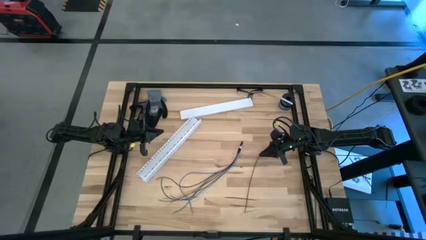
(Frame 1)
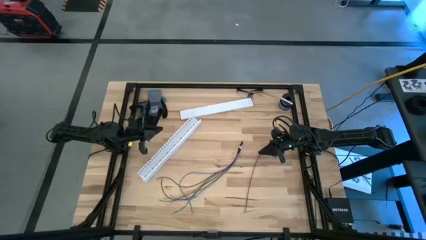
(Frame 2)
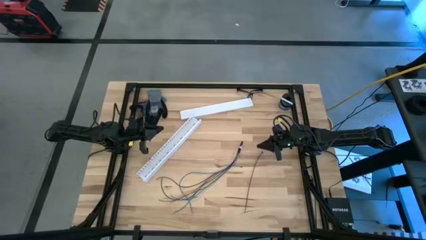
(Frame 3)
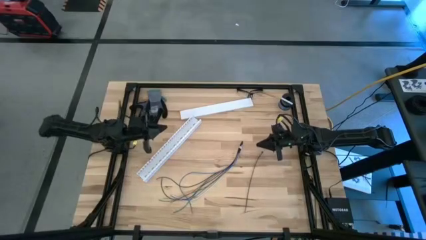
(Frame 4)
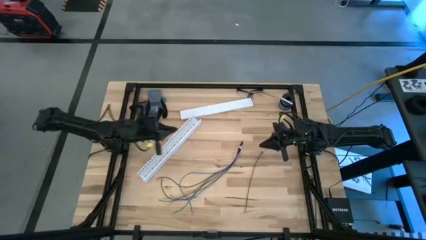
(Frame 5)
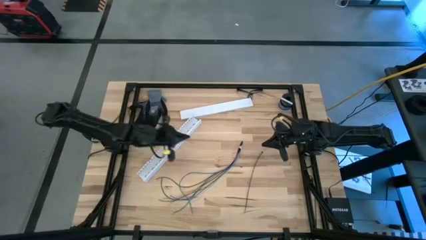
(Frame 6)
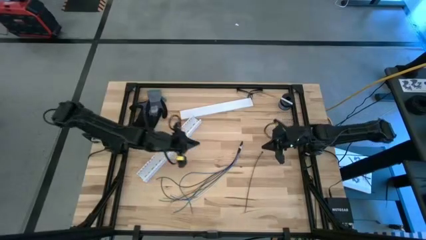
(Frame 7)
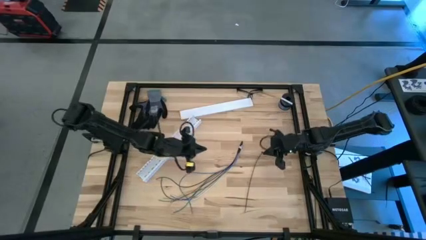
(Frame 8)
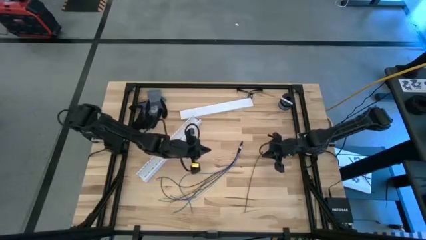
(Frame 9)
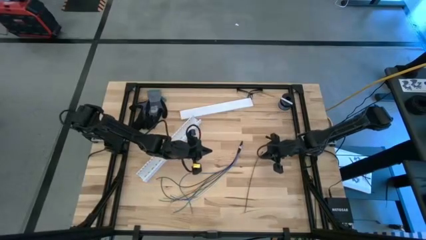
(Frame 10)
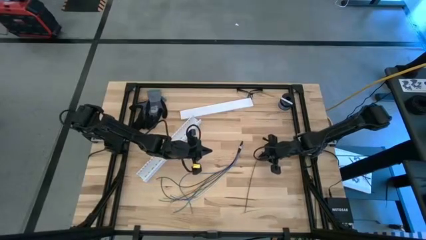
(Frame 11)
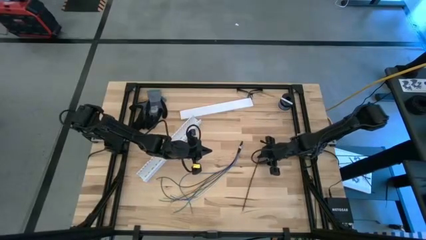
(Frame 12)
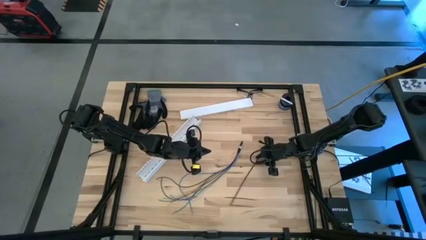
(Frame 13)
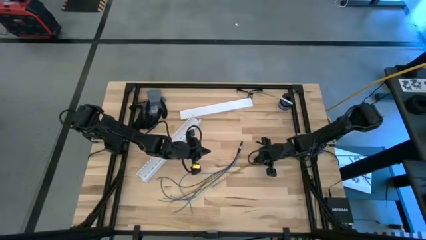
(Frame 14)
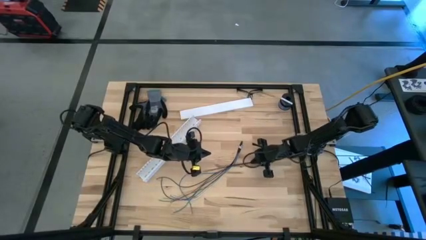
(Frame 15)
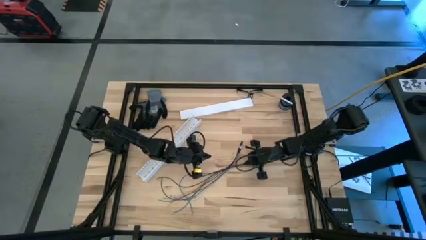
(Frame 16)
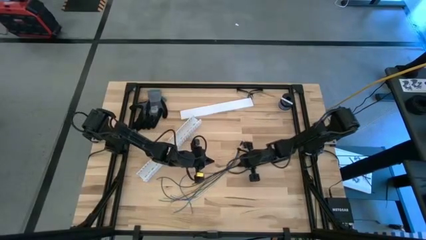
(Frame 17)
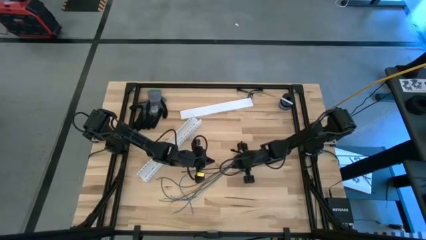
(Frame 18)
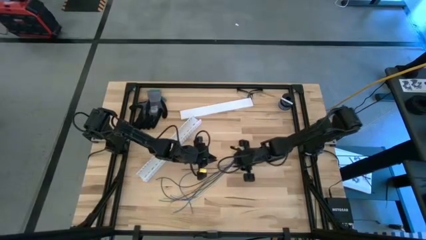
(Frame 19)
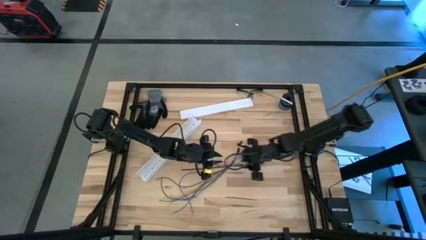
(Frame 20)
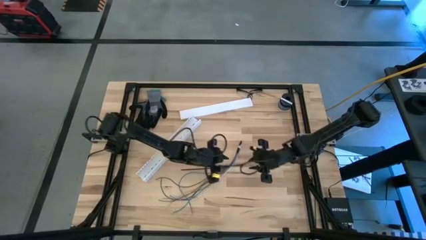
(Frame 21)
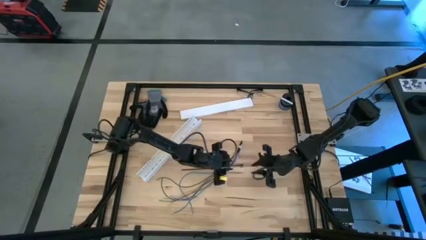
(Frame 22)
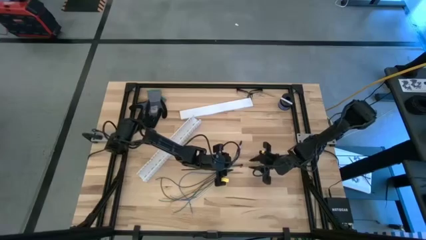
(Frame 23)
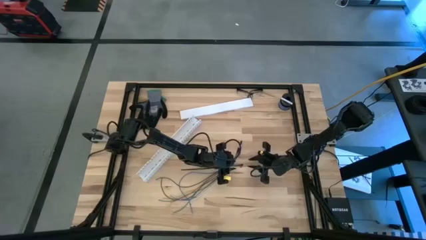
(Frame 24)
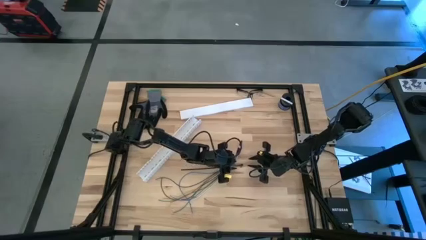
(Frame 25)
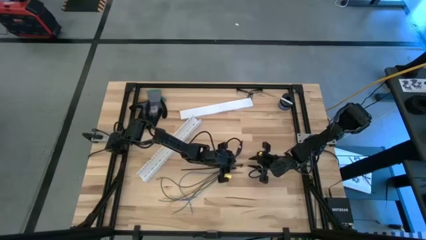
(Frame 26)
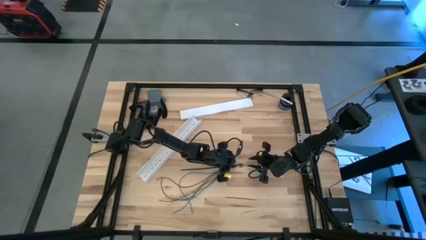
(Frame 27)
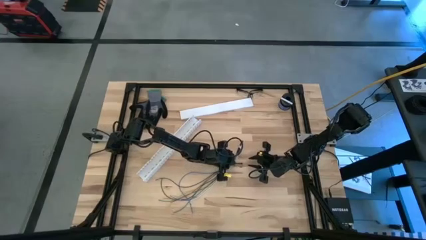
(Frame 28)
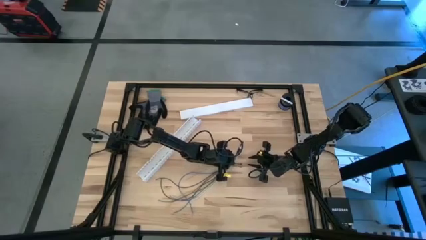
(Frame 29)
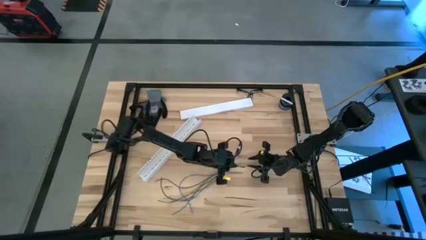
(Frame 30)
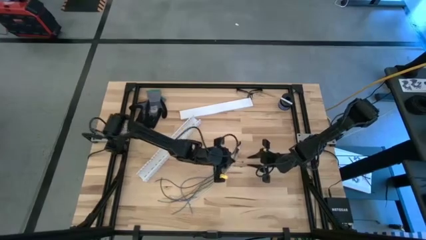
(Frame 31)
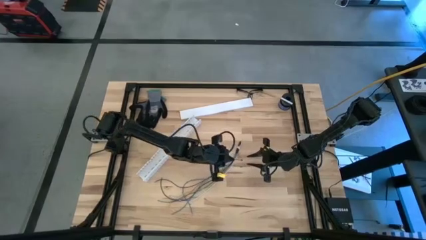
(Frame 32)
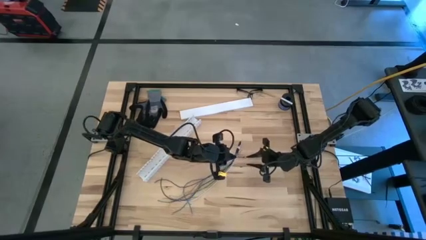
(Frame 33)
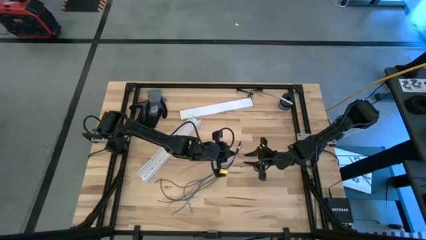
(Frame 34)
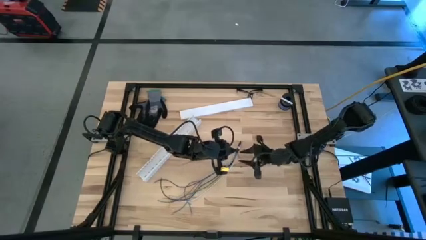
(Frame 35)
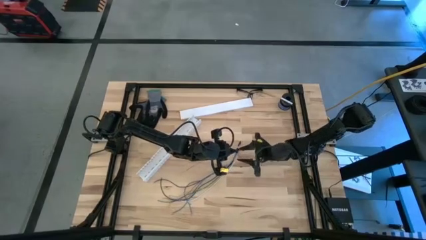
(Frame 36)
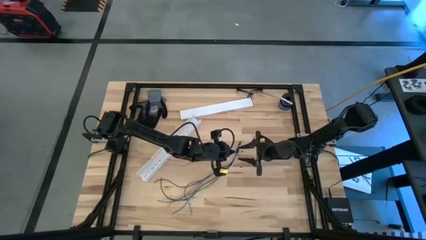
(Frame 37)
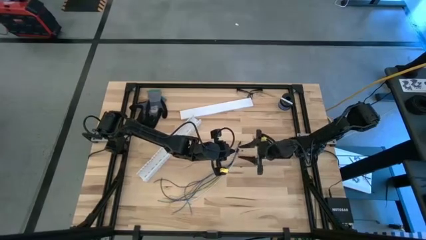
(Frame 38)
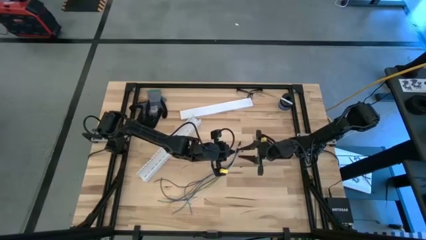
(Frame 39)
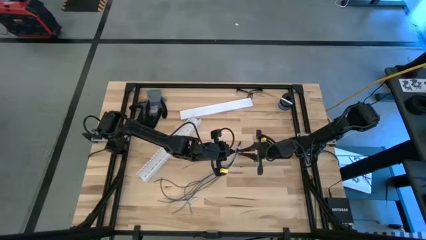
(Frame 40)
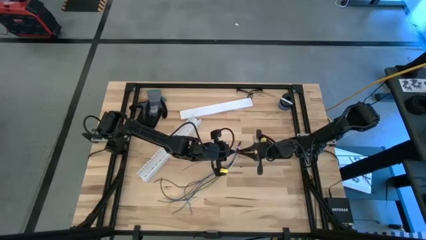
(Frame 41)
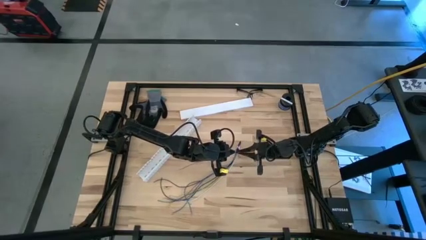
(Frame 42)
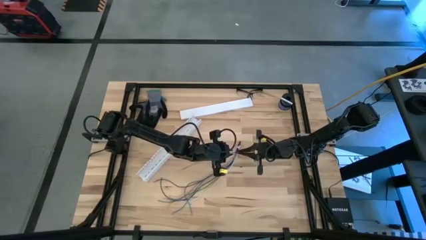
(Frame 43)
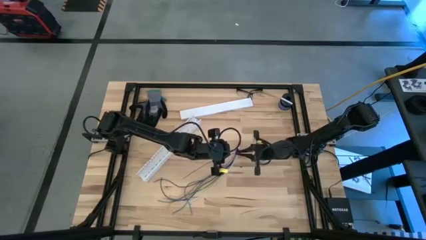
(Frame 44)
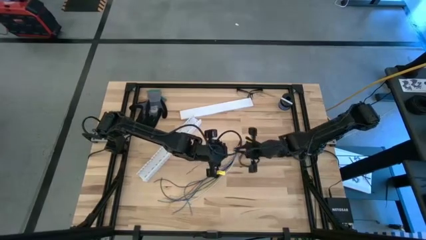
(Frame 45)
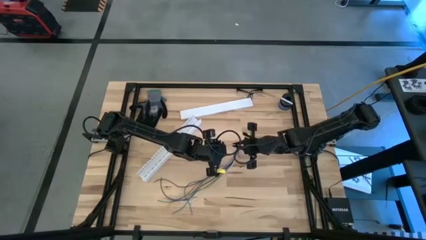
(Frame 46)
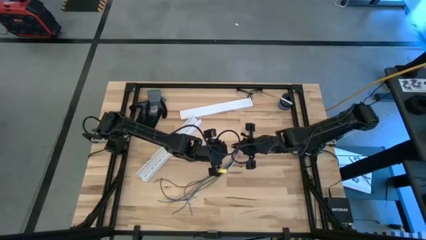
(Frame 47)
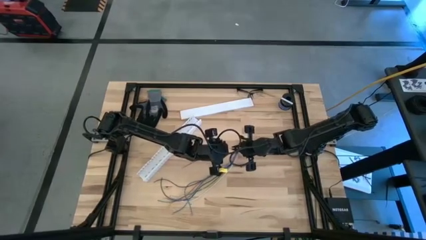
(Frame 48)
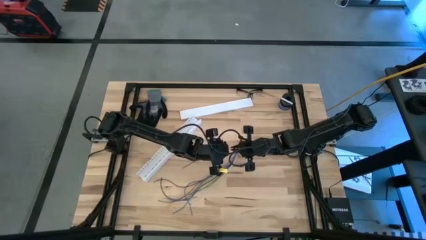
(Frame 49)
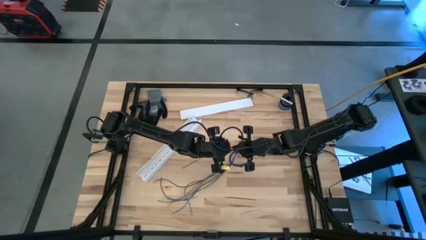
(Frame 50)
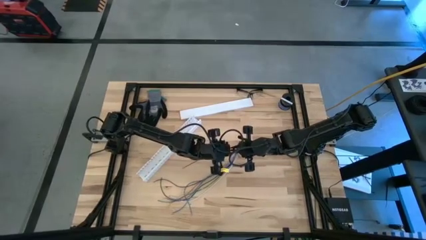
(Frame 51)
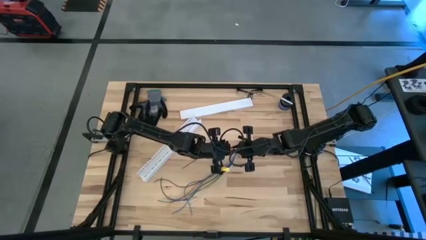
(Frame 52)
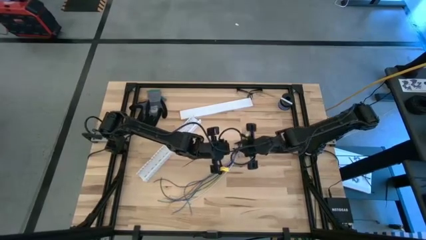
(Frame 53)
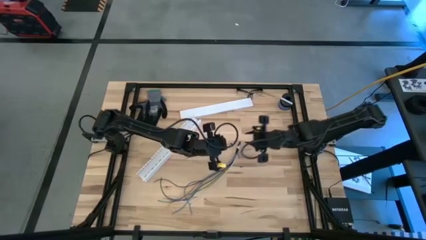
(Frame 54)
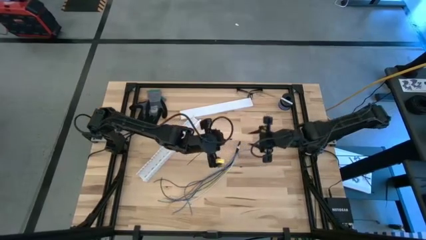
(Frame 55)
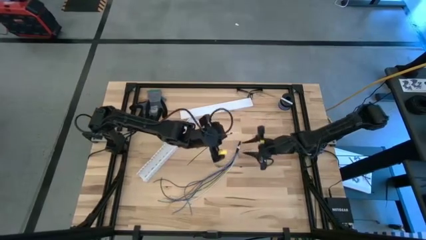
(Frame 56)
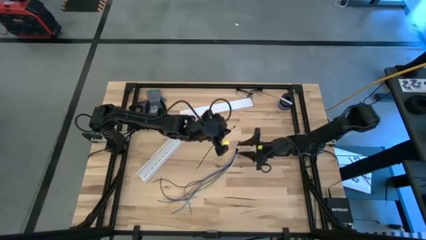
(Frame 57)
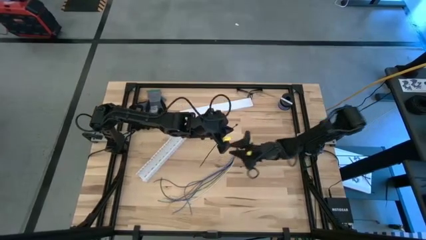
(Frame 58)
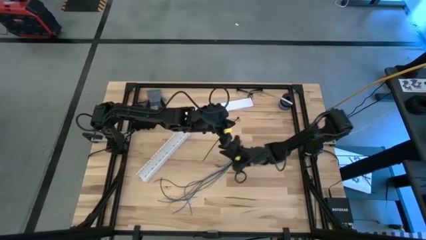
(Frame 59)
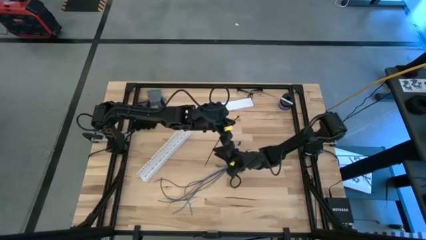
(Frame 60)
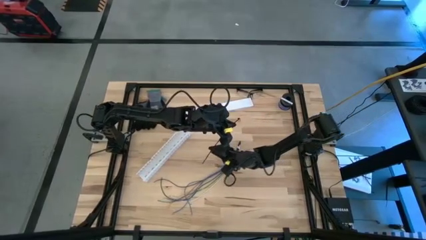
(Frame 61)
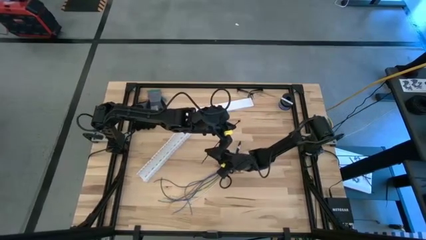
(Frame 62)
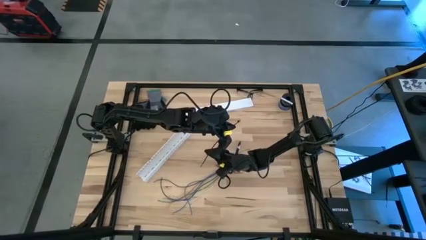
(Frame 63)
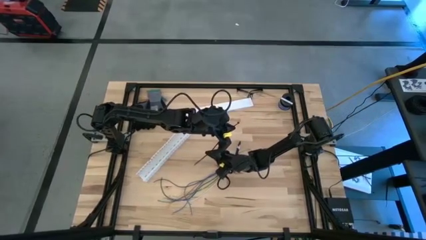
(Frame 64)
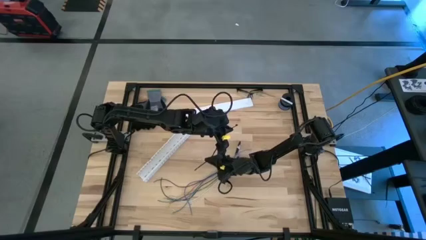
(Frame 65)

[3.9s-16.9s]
Task: Ziptie cables
Wrap the zip tie on the cables

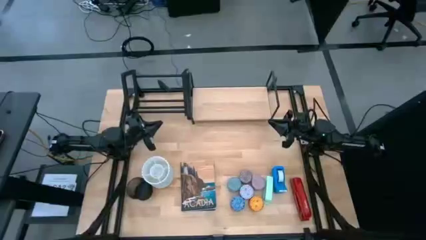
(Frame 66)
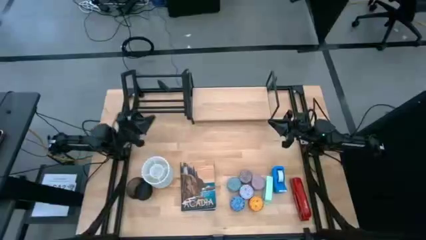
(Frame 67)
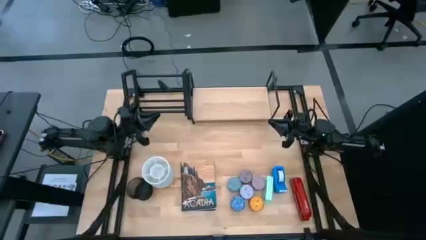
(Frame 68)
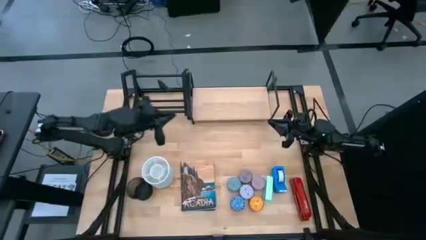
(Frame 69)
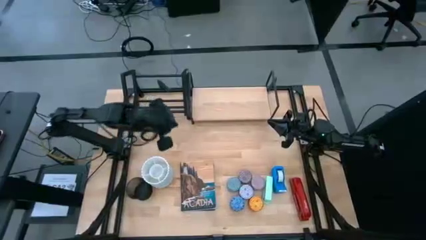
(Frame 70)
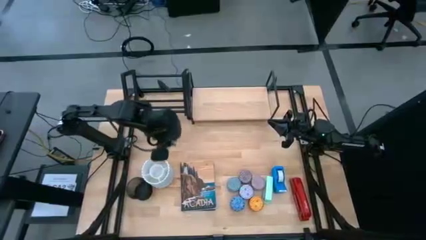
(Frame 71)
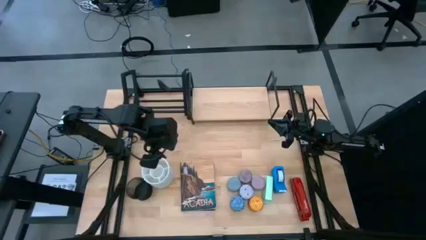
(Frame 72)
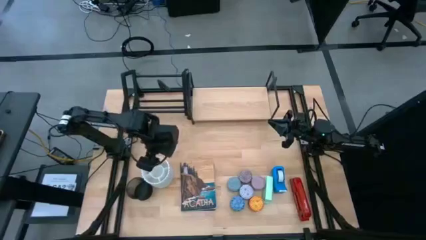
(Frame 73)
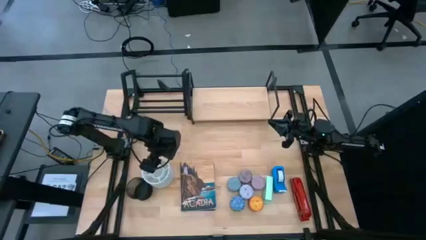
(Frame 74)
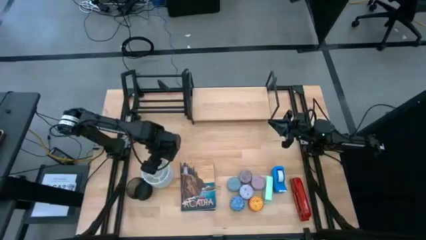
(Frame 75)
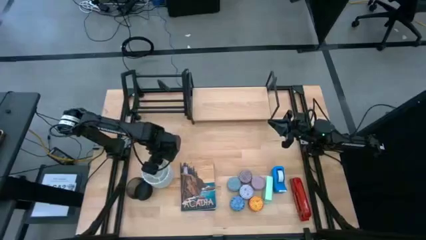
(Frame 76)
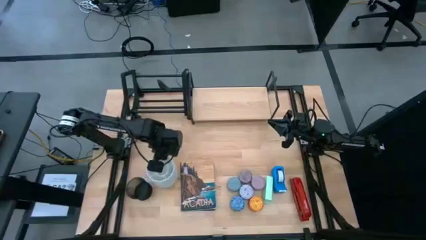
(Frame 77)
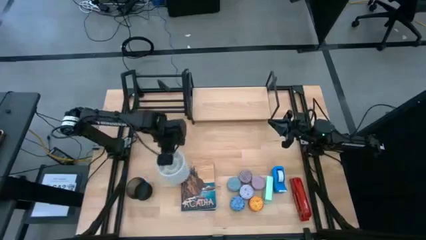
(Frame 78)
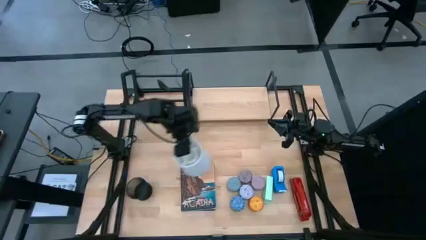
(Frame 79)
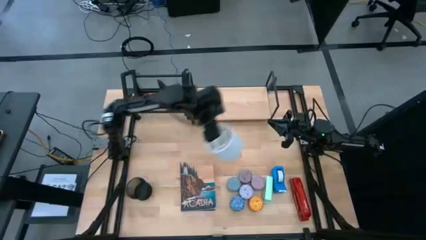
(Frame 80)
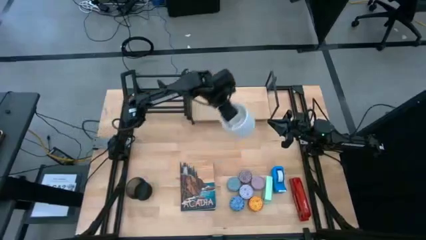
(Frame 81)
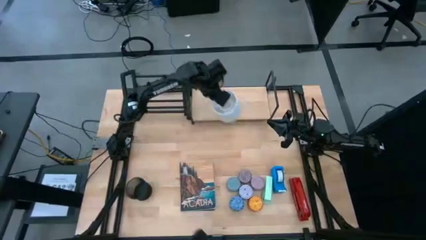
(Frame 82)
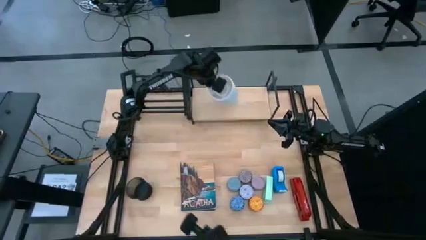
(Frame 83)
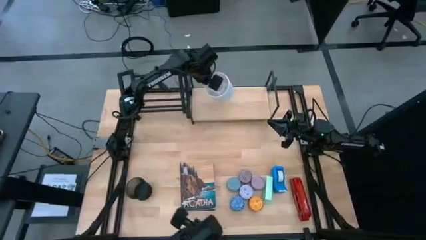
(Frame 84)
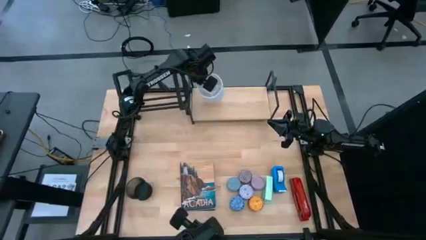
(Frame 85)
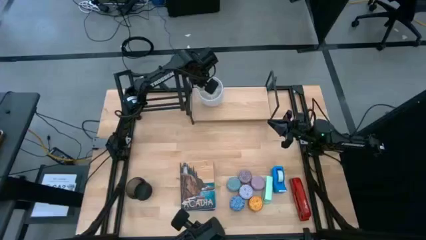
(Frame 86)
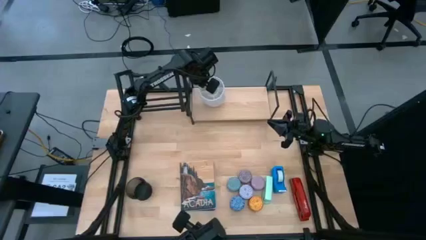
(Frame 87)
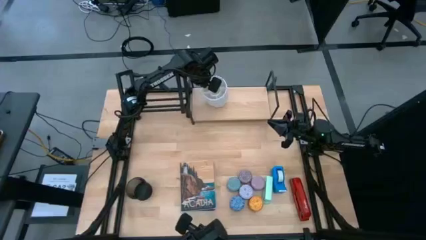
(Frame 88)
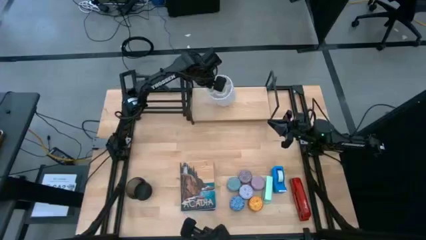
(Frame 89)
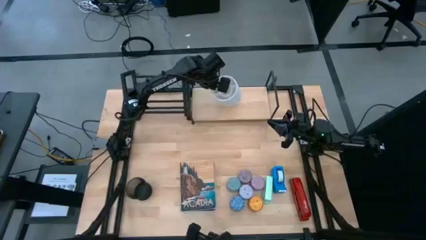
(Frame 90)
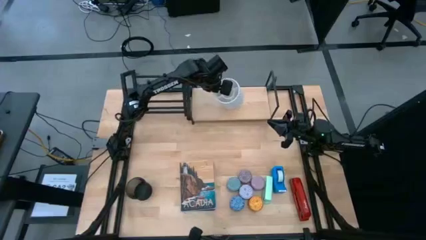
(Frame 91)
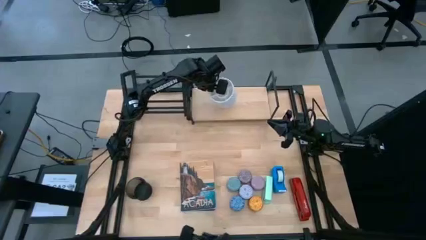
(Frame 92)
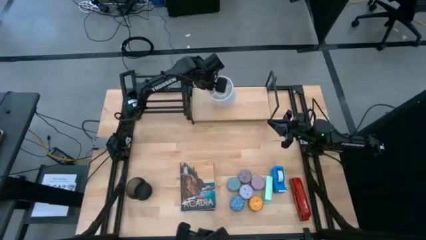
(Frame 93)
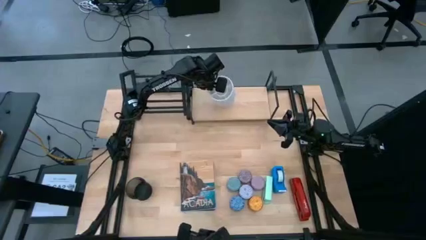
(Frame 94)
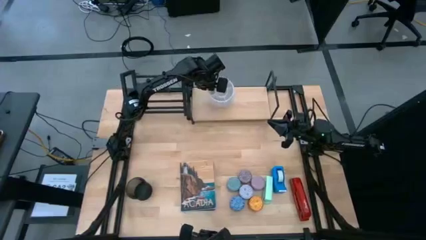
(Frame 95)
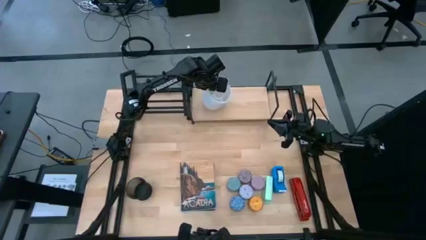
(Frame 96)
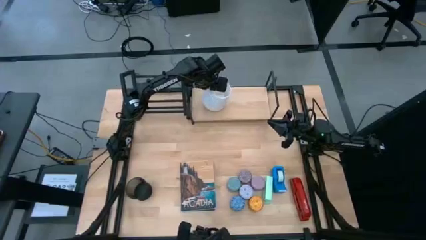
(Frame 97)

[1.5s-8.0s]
Task: Stock shelves
Put the white pen organizer on the shelf
